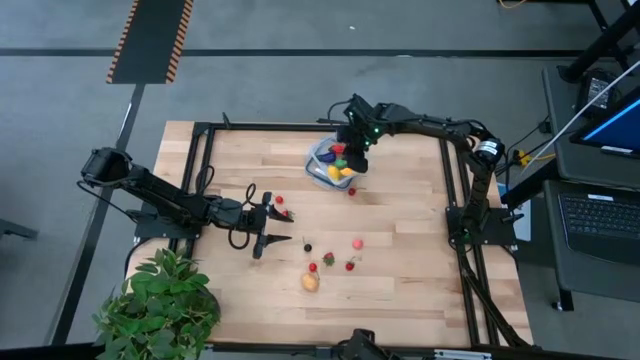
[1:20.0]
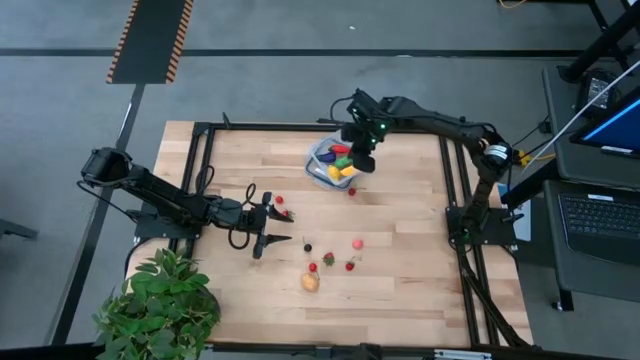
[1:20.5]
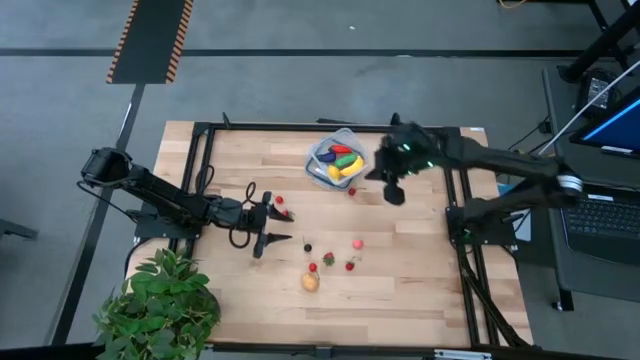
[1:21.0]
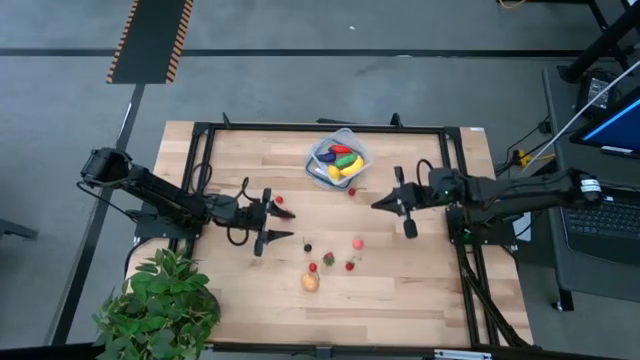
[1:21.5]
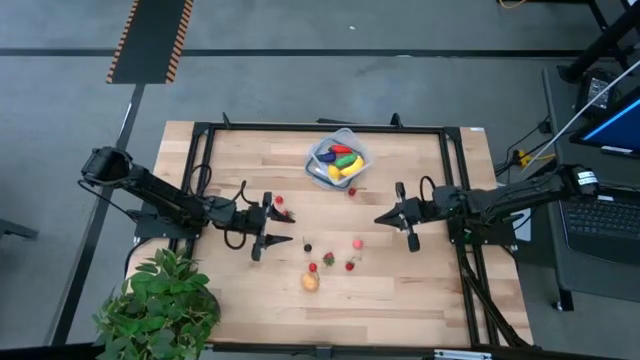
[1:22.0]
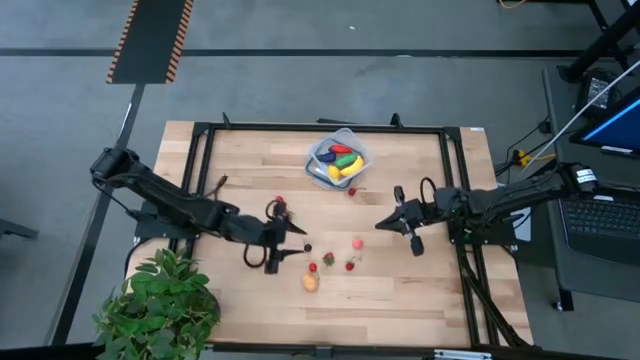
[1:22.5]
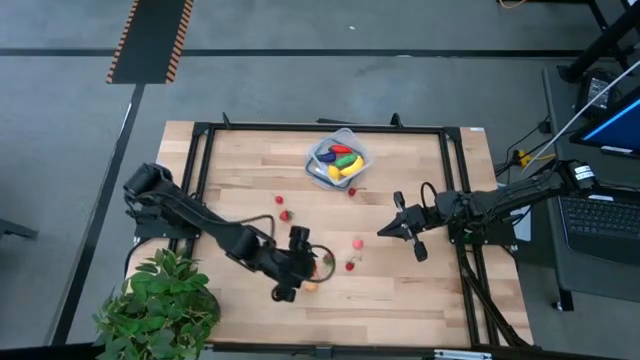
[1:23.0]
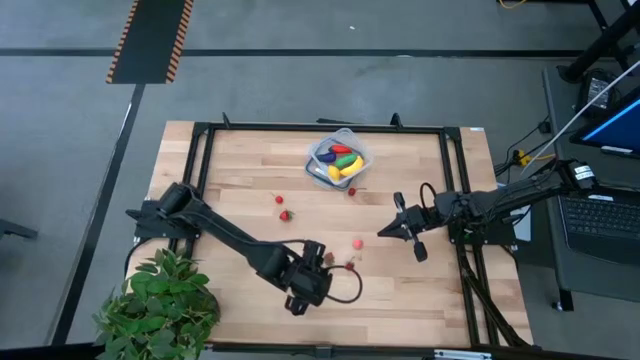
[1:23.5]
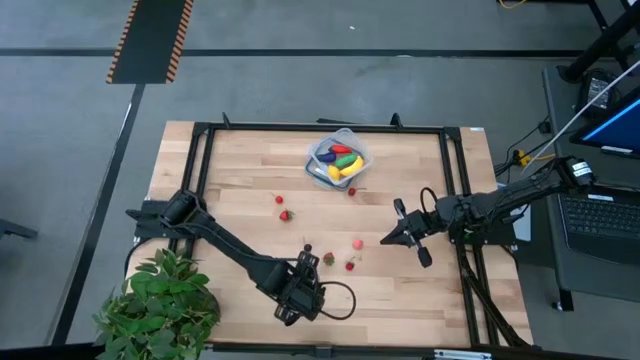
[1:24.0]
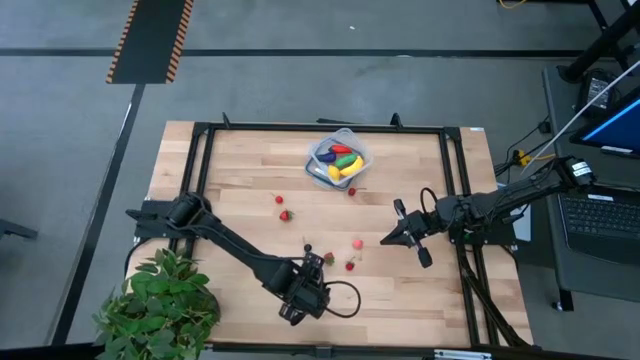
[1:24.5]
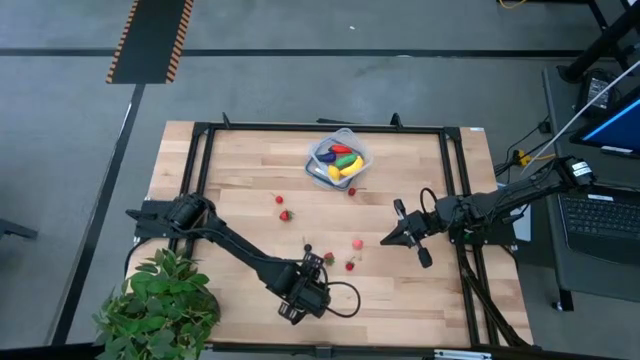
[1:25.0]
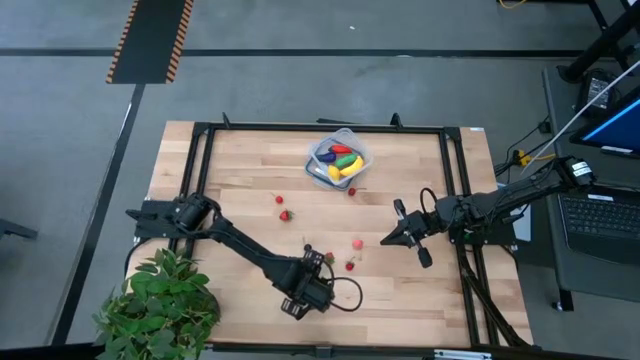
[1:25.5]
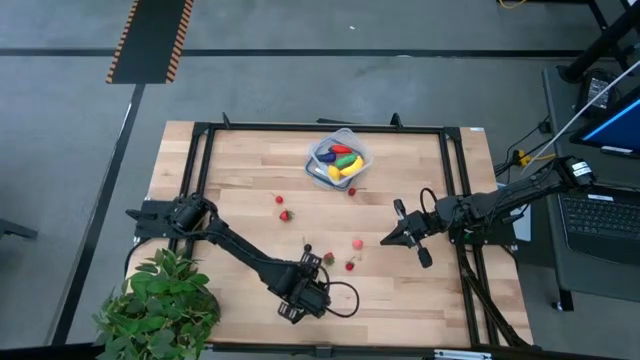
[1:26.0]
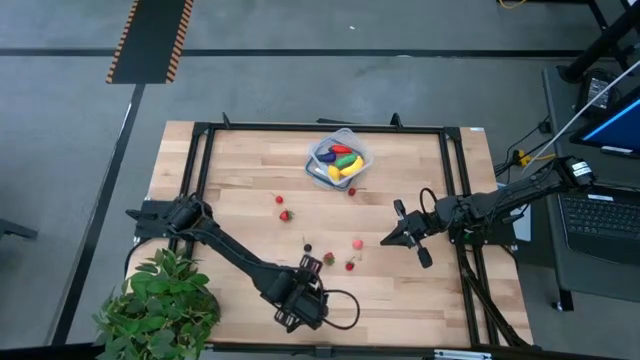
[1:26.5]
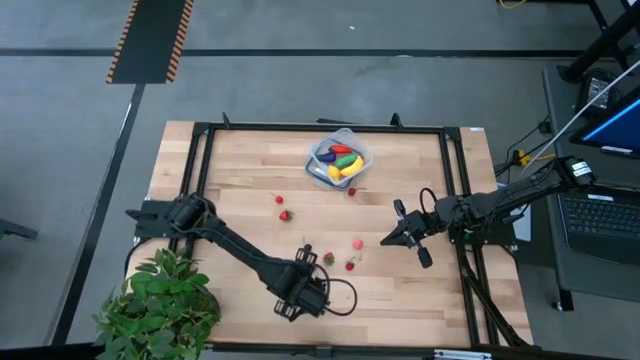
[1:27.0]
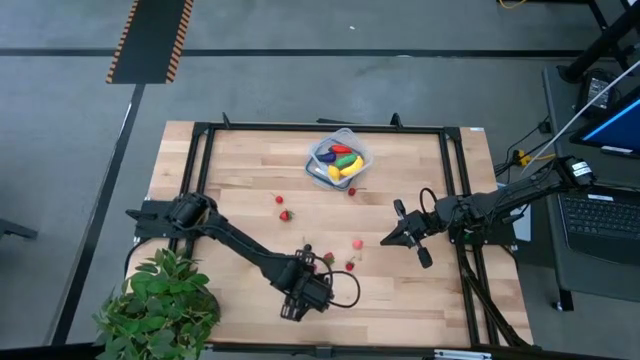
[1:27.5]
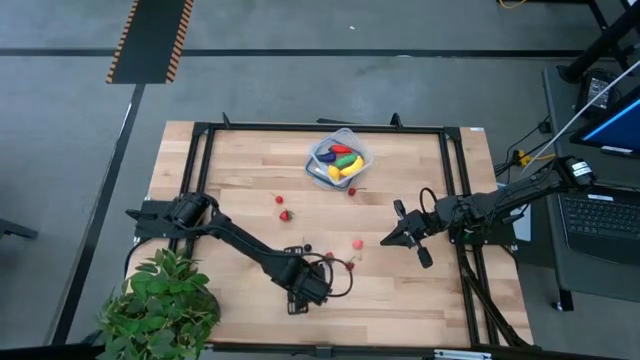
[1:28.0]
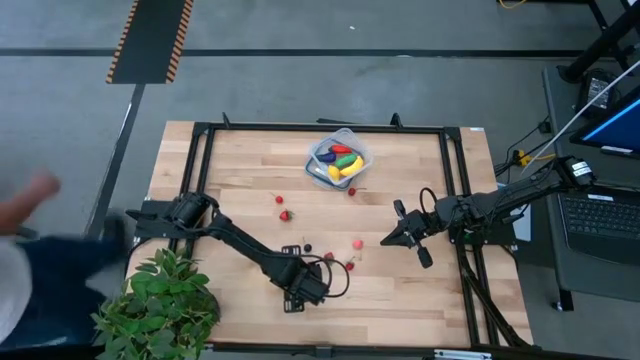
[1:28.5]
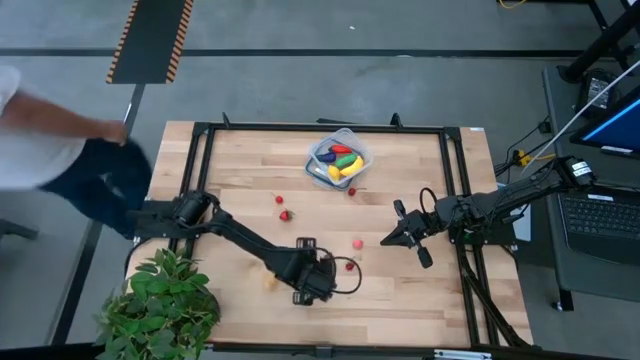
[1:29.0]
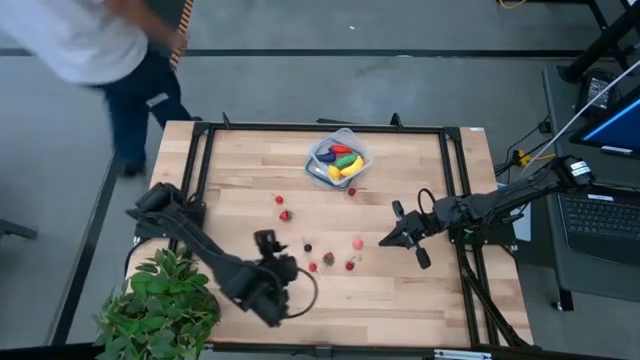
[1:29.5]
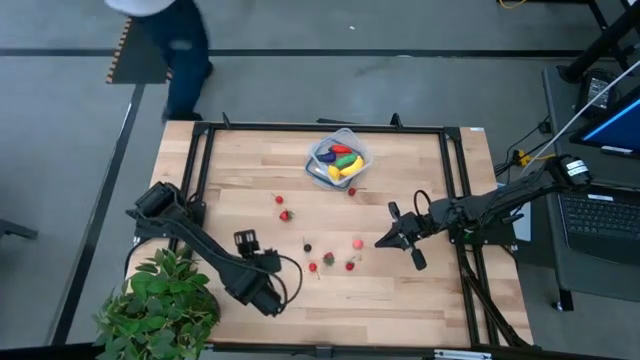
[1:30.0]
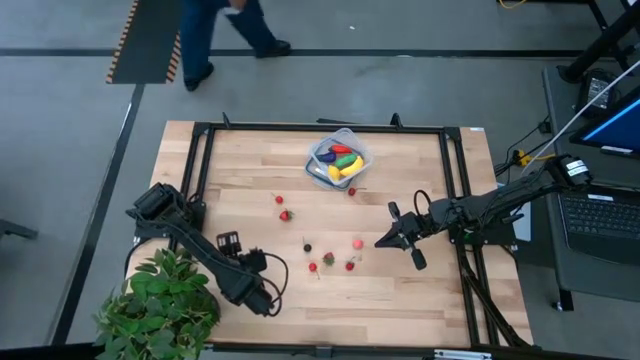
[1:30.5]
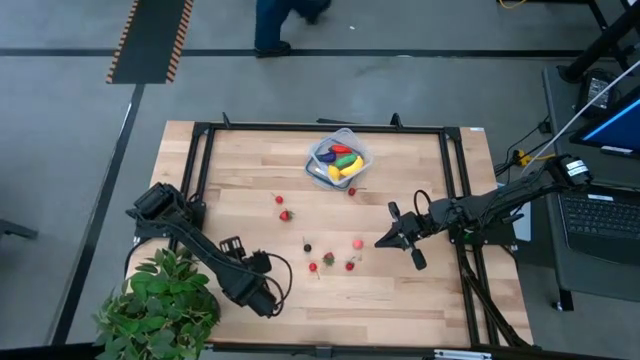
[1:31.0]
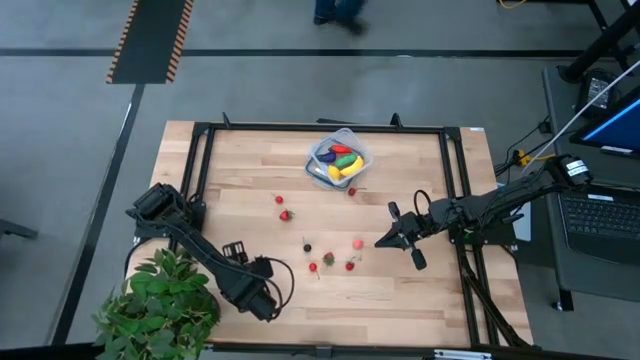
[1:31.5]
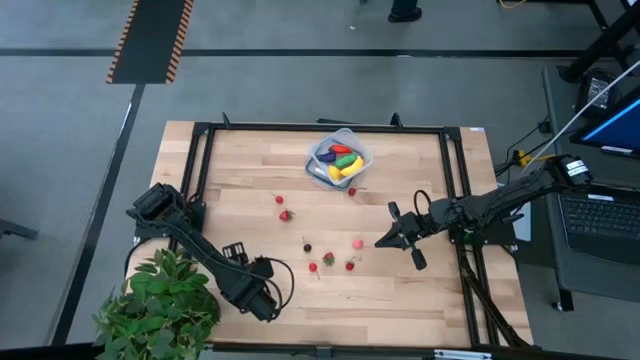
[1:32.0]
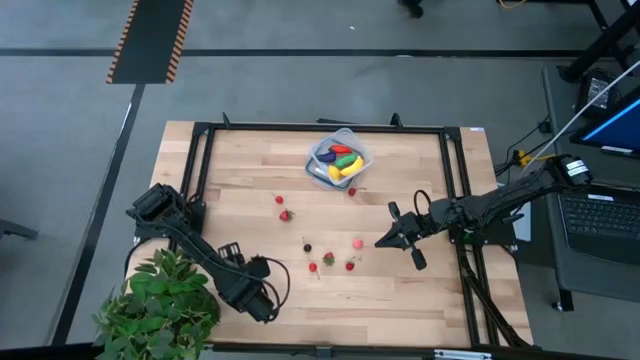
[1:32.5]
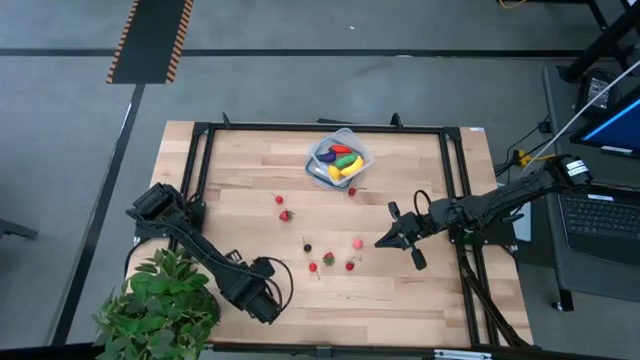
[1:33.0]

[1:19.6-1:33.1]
Task: Pick and placing Produce into tupperware
Put the brown potato into the transparent container

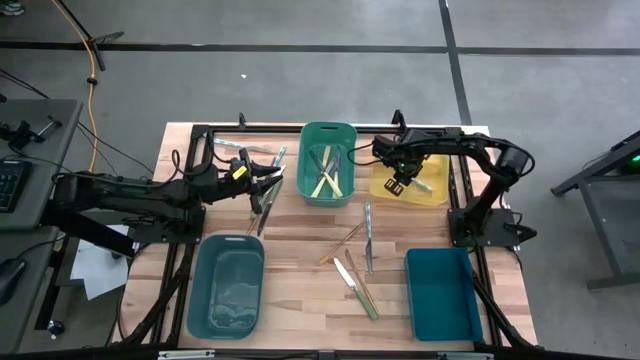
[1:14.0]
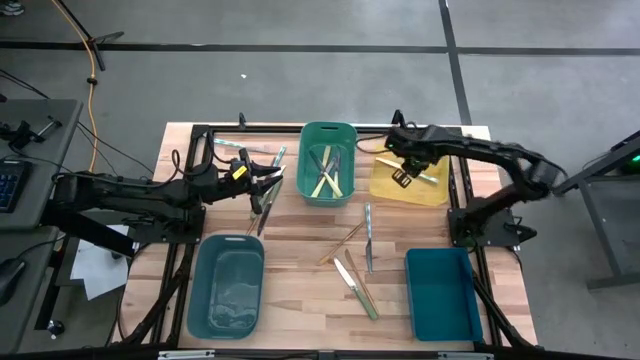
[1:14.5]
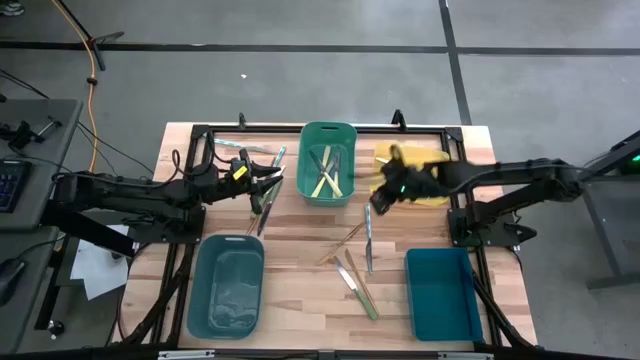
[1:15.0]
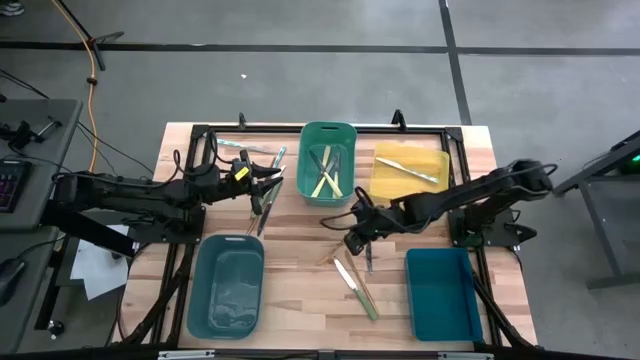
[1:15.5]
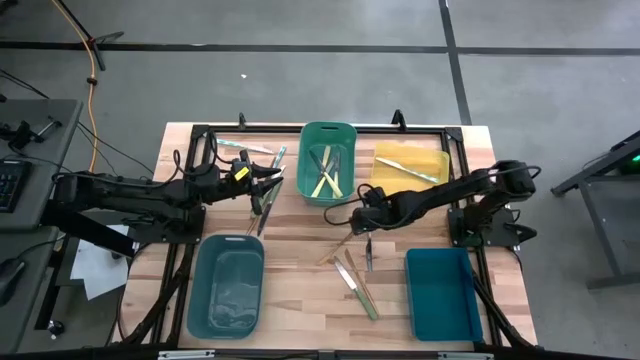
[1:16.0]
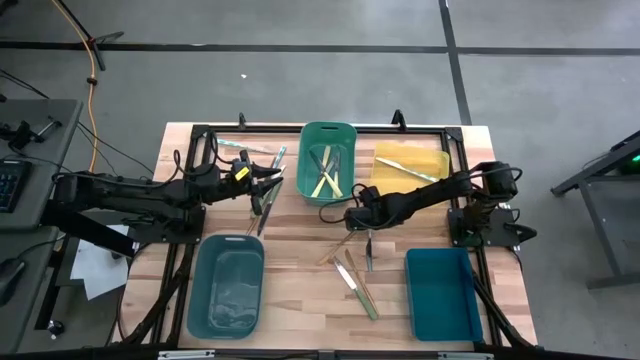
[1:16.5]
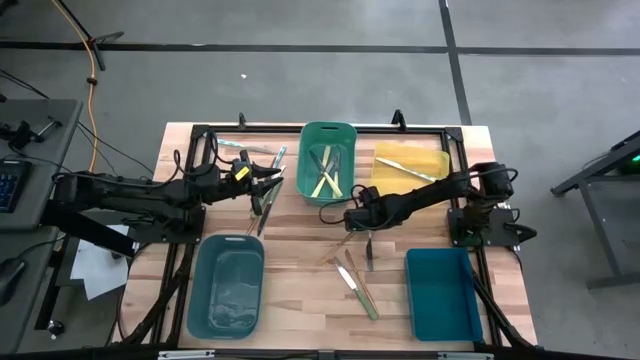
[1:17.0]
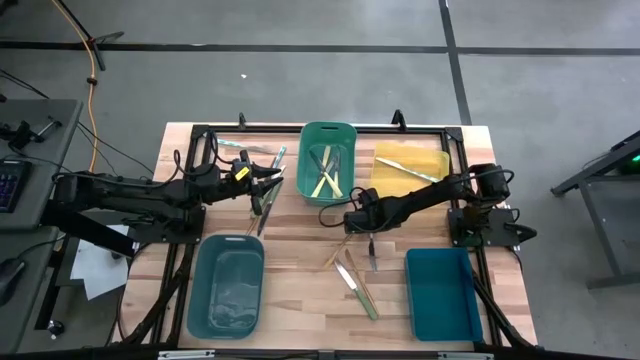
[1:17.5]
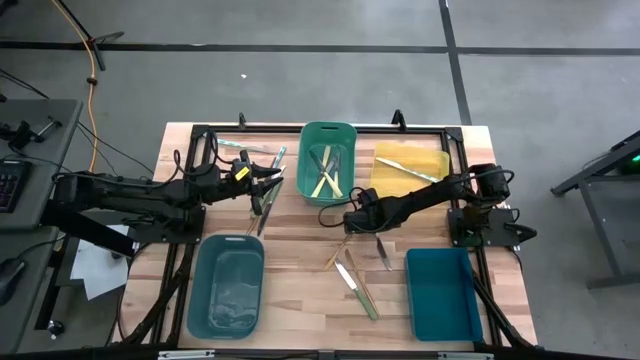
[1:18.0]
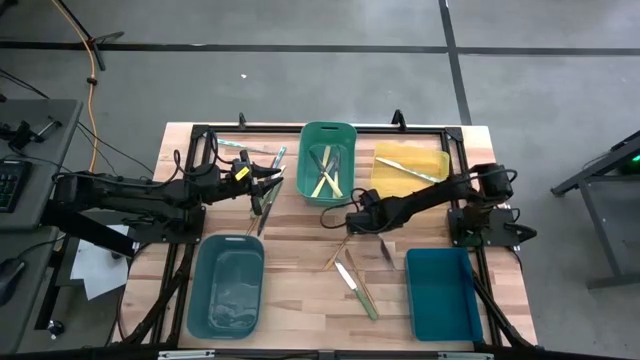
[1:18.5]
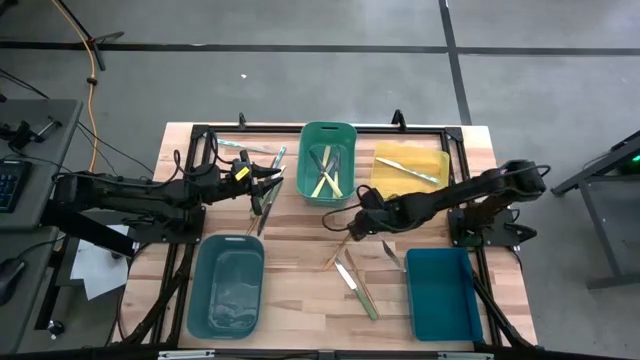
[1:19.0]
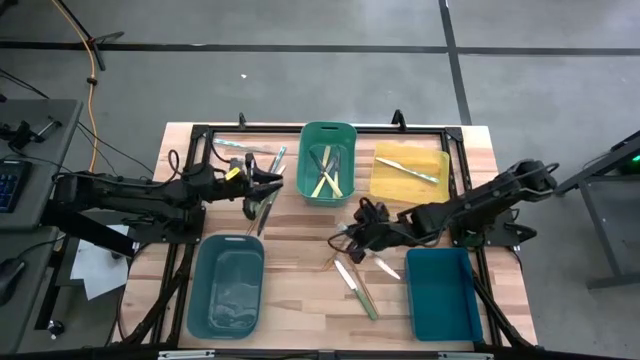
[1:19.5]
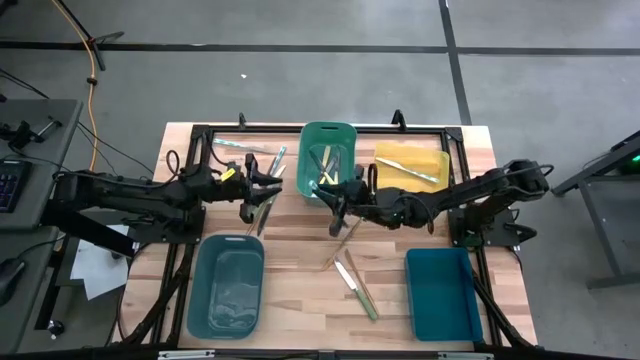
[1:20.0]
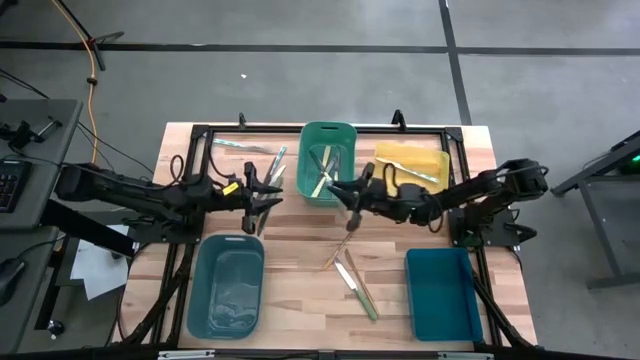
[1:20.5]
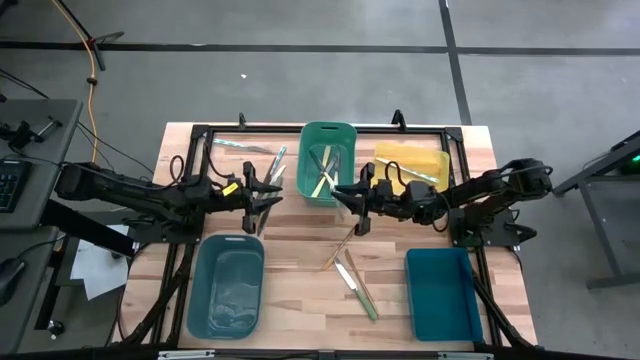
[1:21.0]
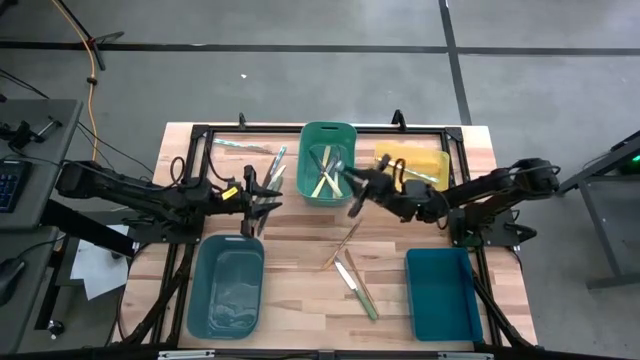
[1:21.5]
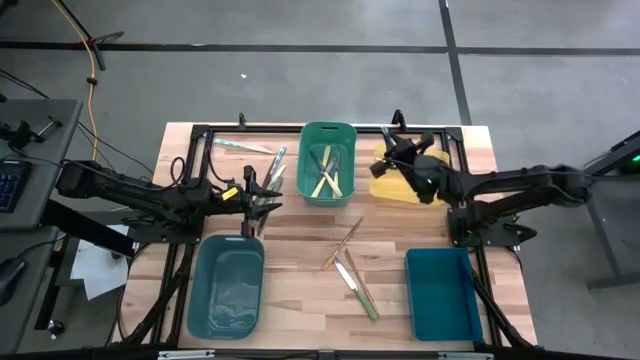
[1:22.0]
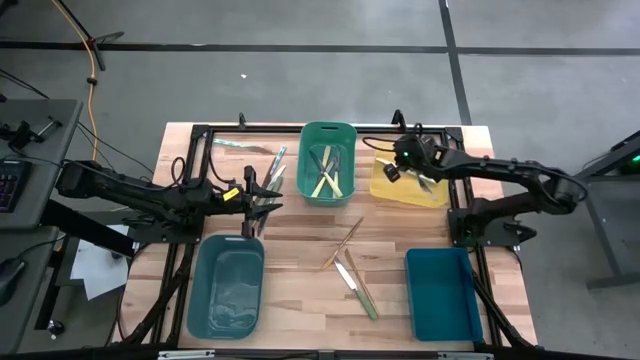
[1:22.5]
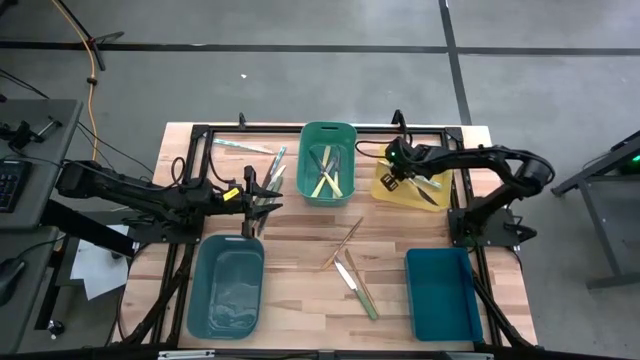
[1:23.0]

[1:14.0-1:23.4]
Task: Sort silverware by color (type)
Put the blue patterned knife into the yellow bin
